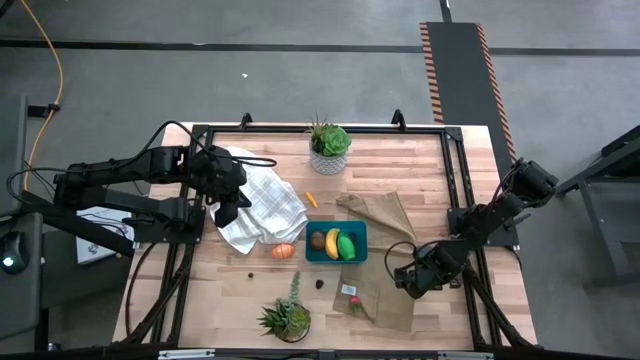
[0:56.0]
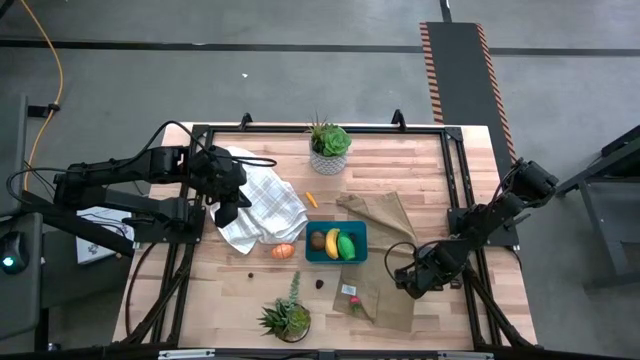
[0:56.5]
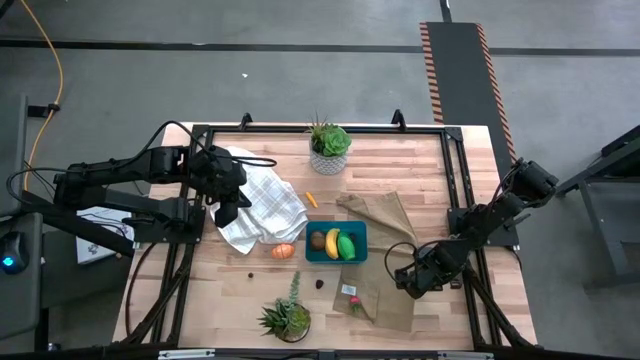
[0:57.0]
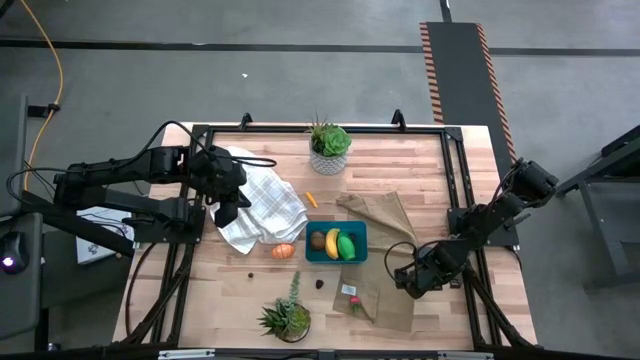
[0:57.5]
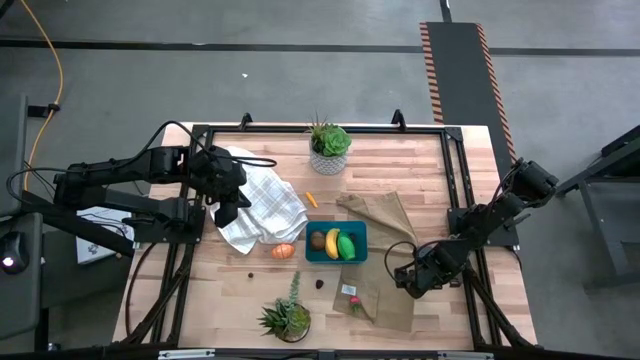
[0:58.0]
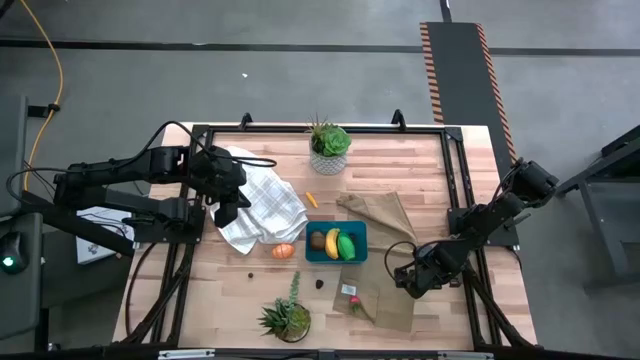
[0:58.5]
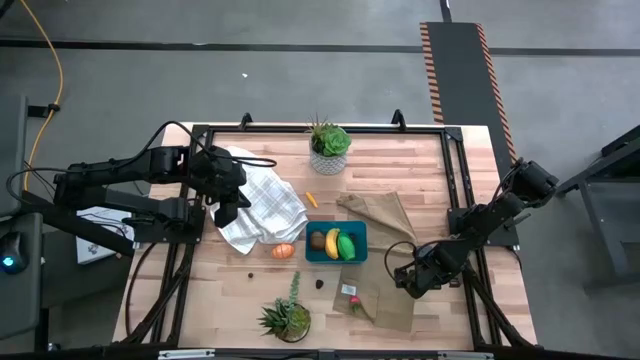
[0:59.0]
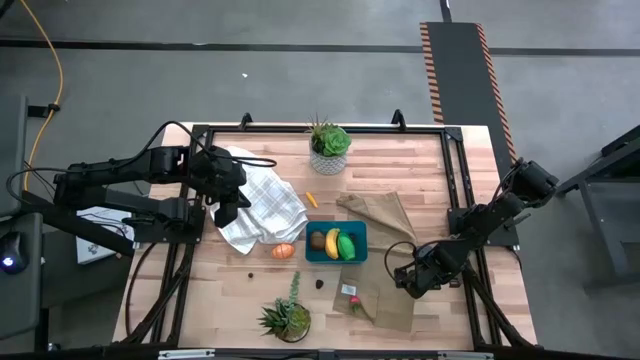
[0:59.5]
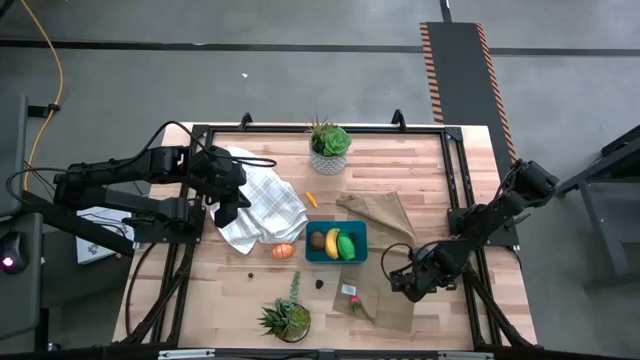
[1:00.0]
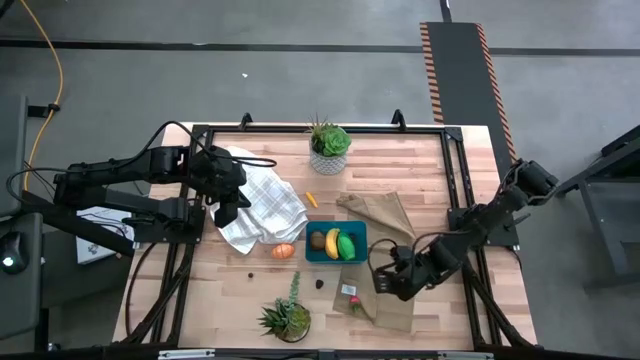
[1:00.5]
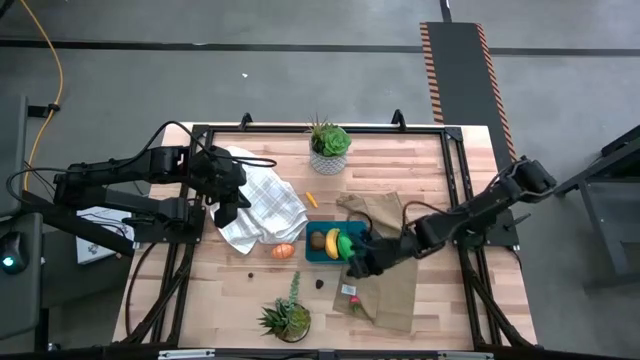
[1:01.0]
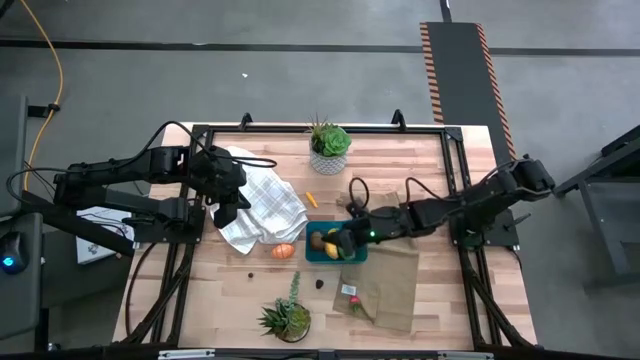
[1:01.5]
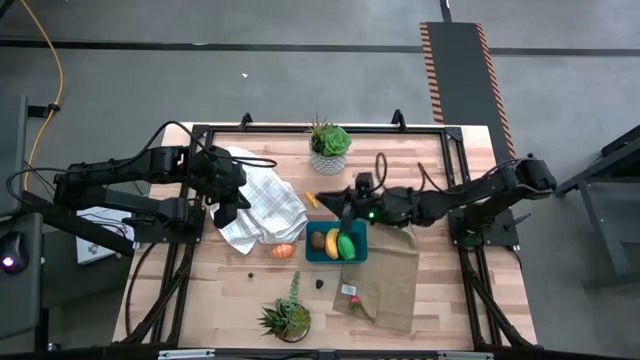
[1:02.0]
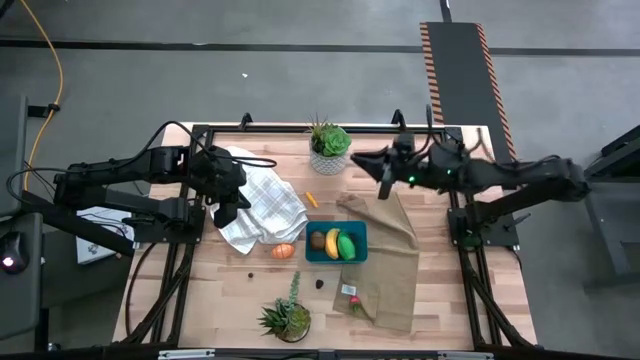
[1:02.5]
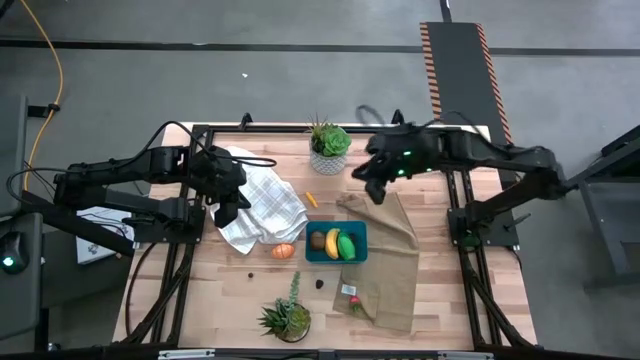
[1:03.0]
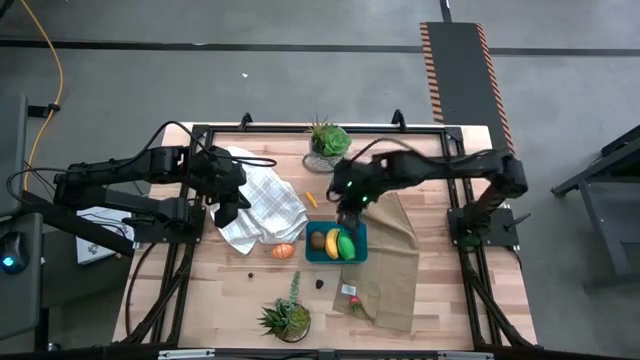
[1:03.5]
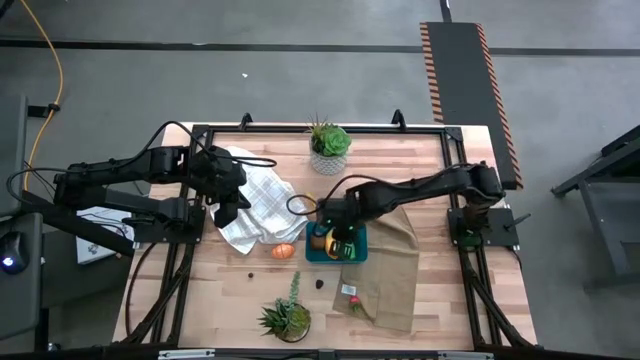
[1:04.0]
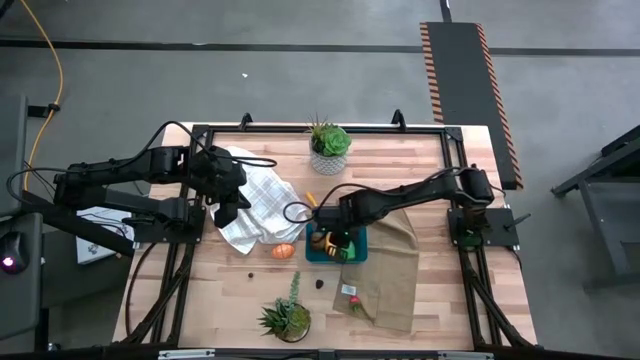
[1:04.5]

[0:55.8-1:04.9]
Task: Pick and placing Produce into tupperware
Put the right blueberry into the blue bin

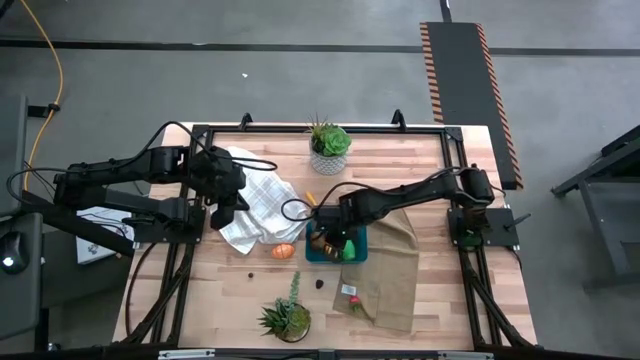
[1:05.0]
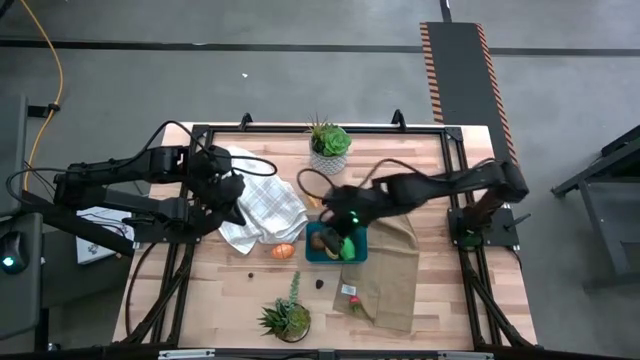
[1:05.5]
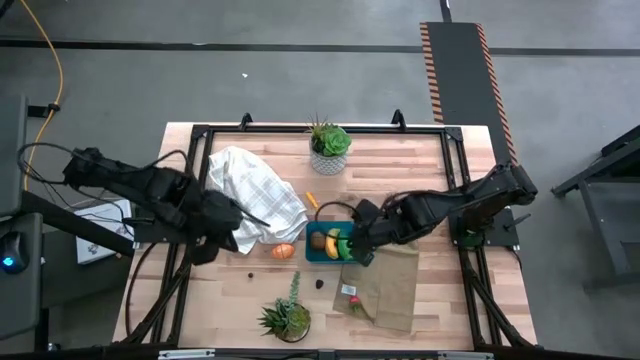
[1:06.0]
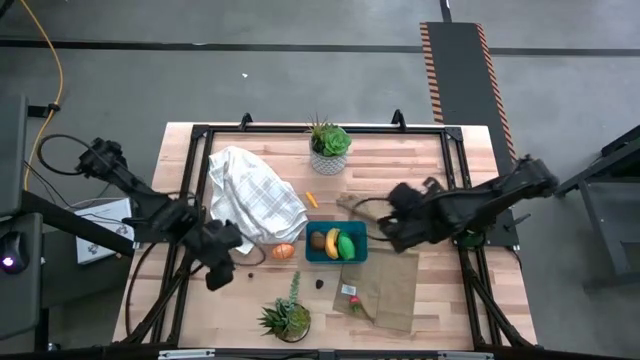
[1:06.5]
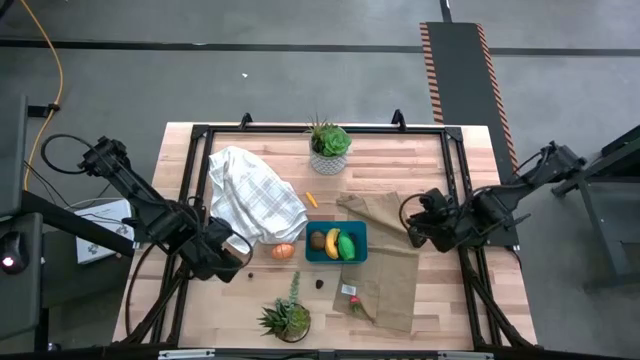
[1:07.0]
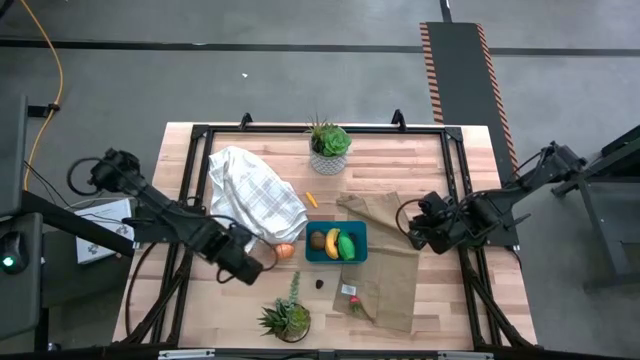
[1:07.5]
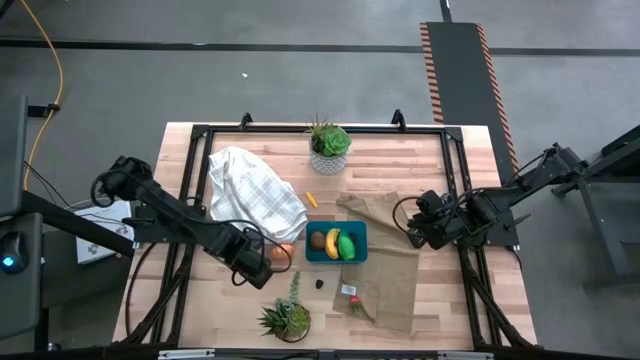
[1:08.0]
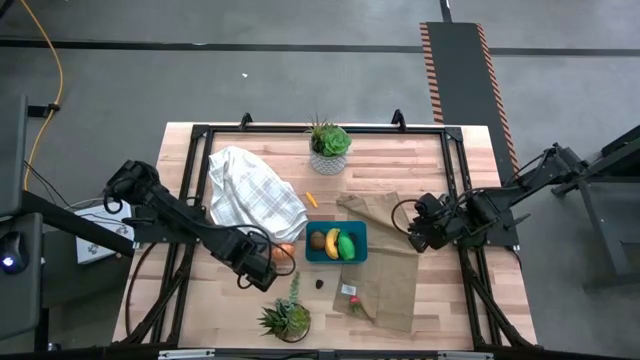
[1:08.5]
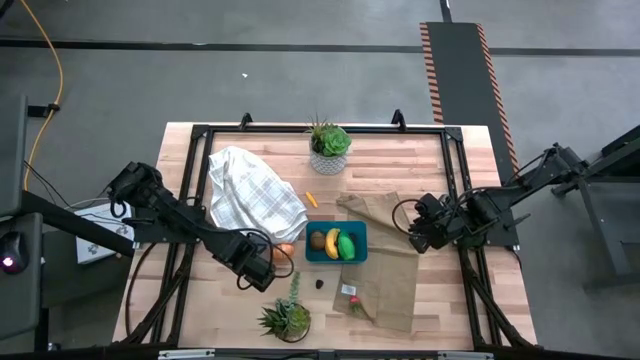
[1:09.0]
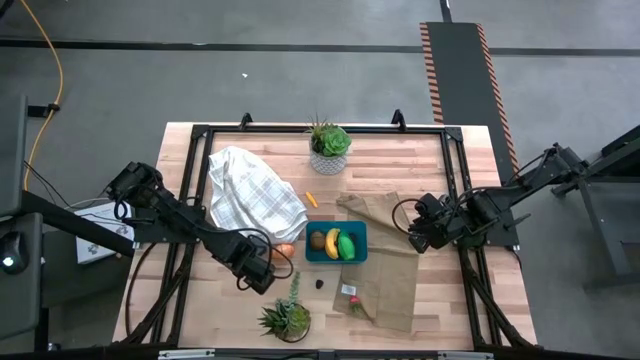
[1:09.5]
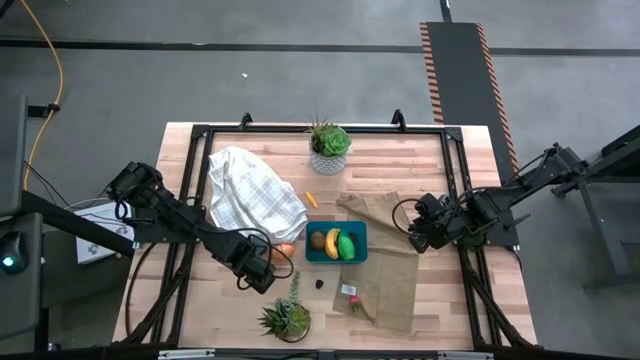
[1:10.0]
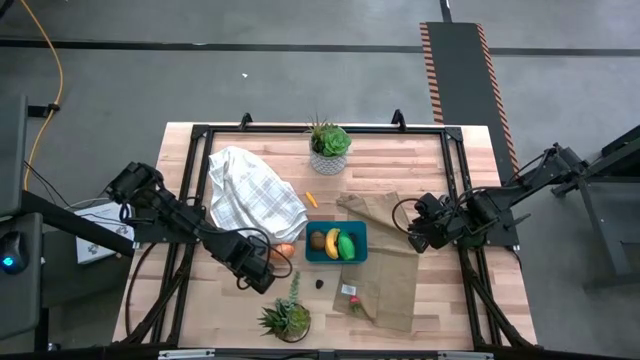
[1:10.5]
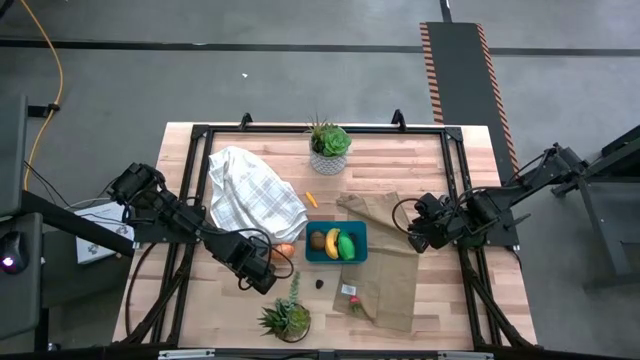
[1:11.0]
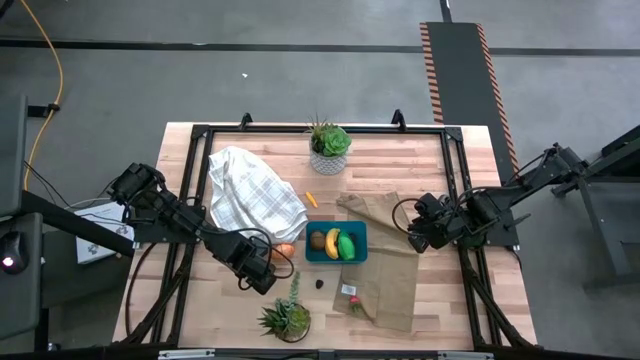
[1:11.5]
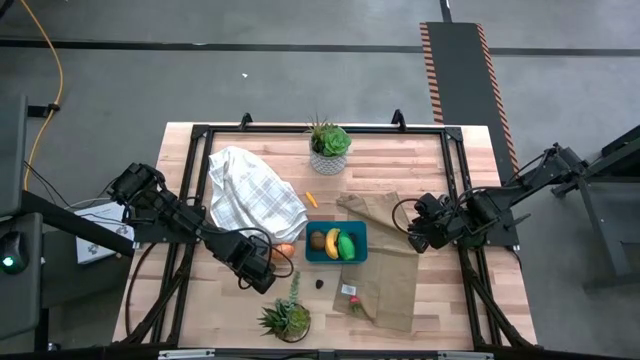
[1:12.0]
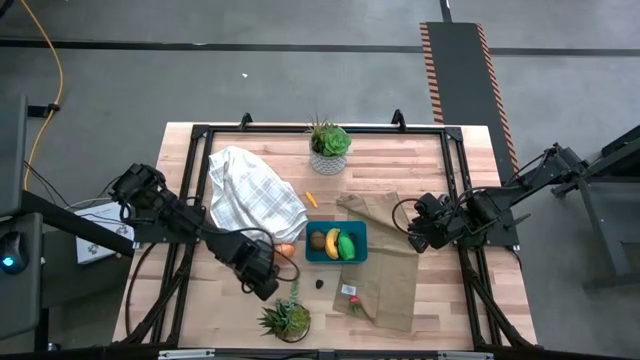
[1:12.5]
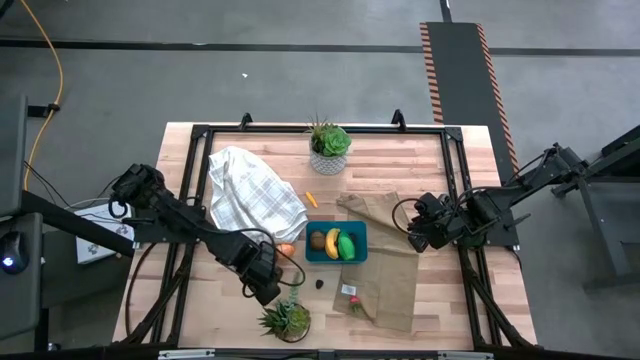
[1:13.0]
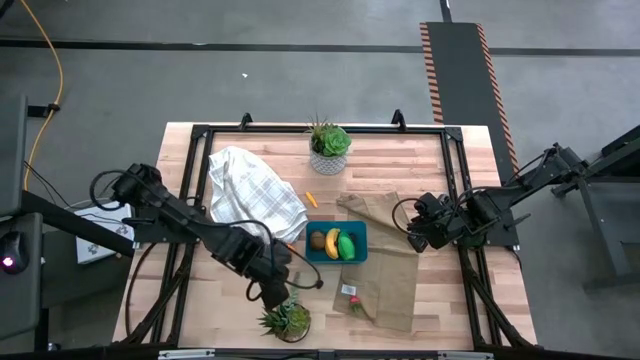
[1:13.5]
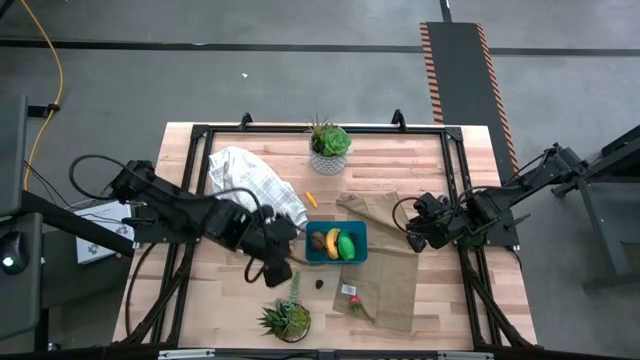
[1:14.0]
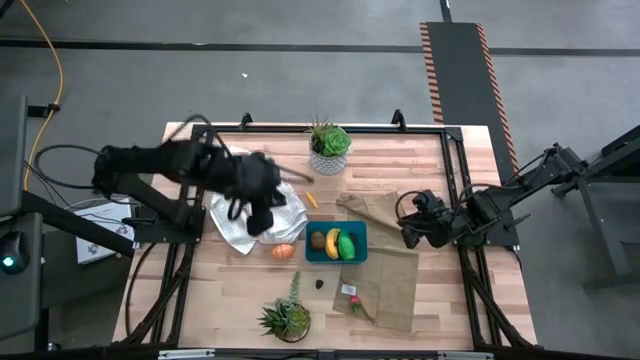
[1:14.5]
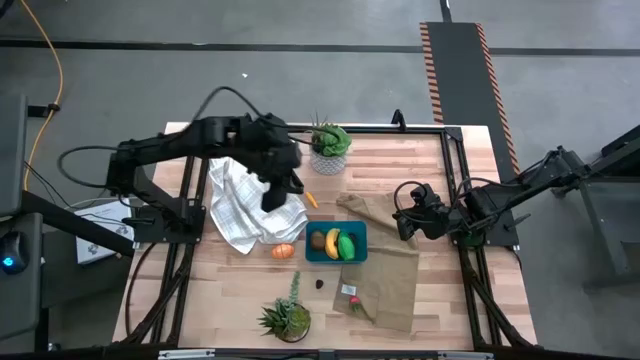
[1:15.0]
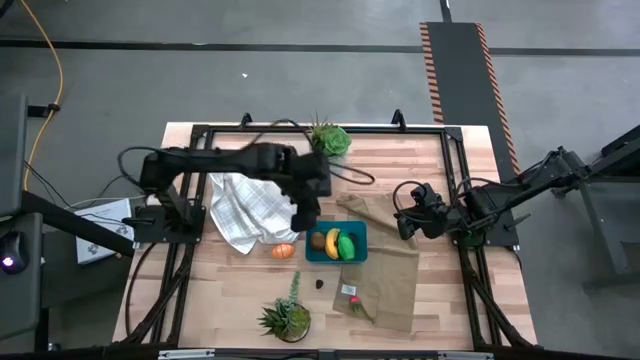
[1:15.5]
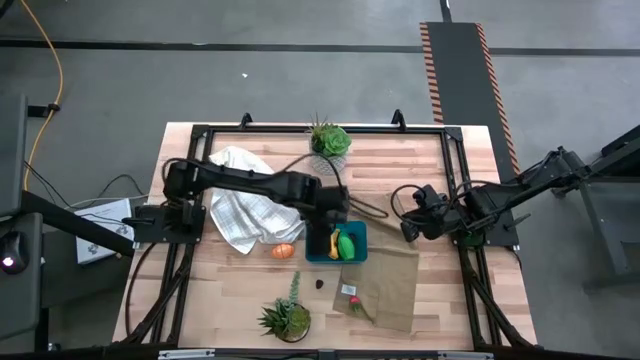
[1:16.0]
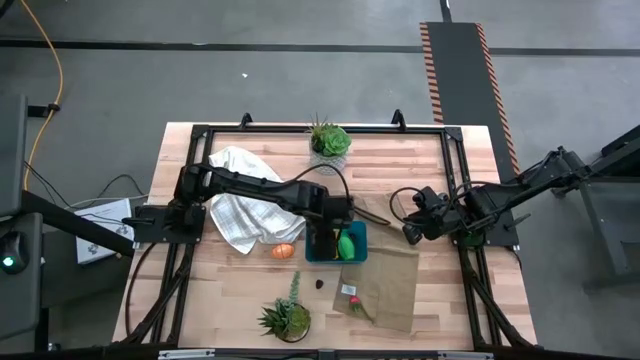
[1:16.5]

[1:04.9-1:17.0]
Put the blueberry into the blue bin
